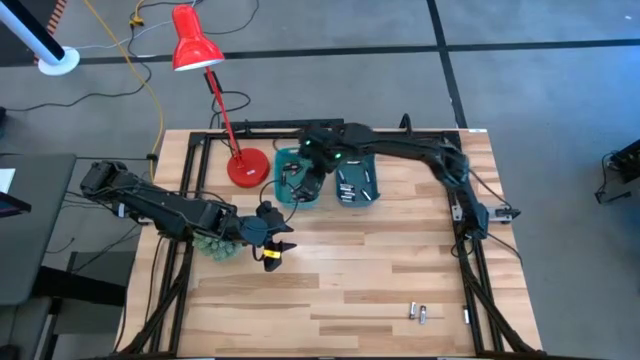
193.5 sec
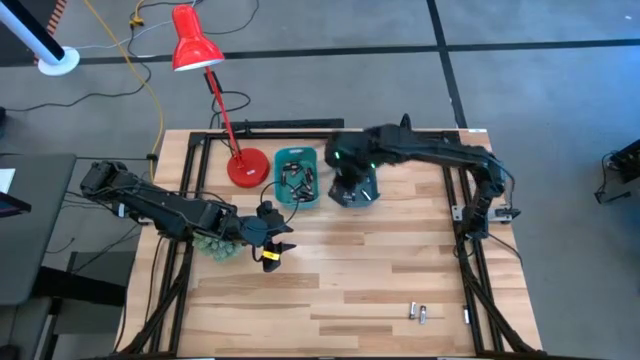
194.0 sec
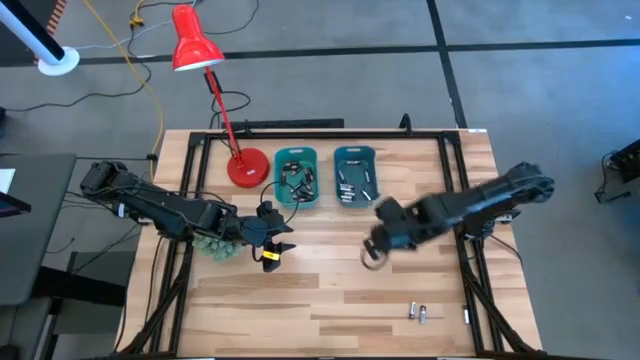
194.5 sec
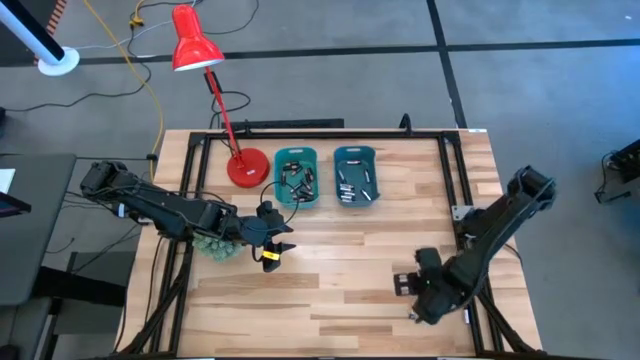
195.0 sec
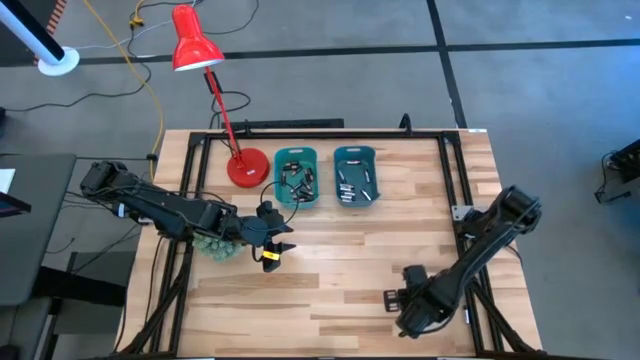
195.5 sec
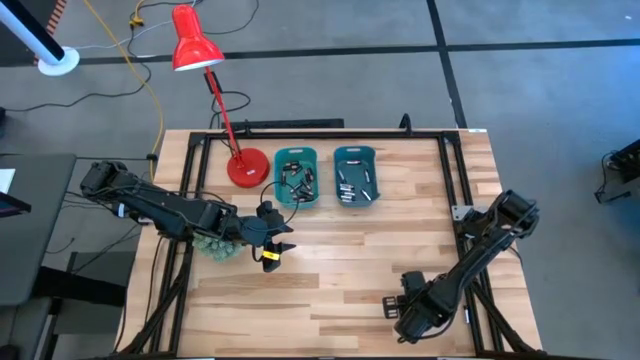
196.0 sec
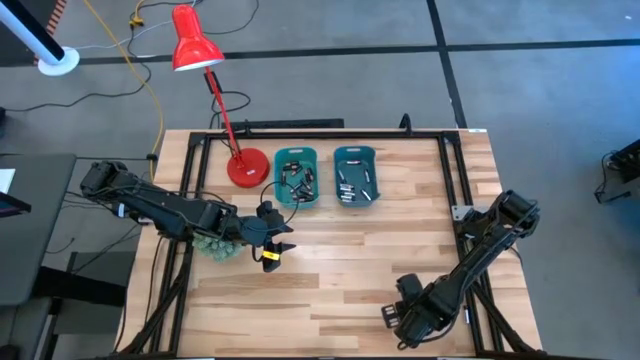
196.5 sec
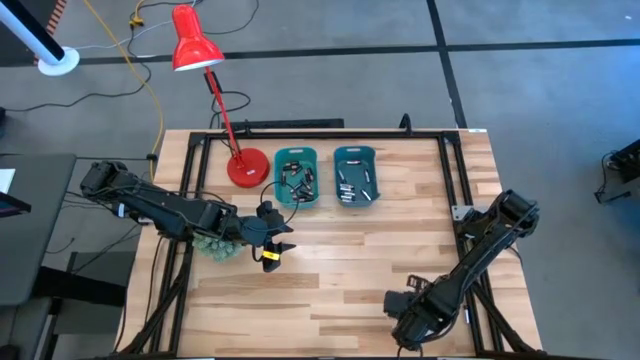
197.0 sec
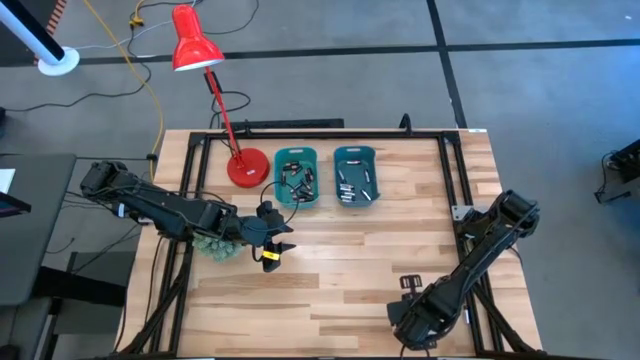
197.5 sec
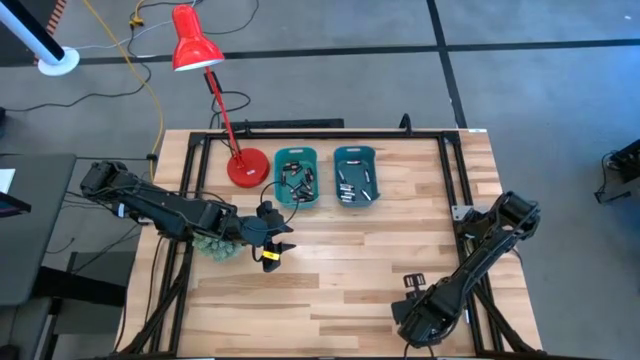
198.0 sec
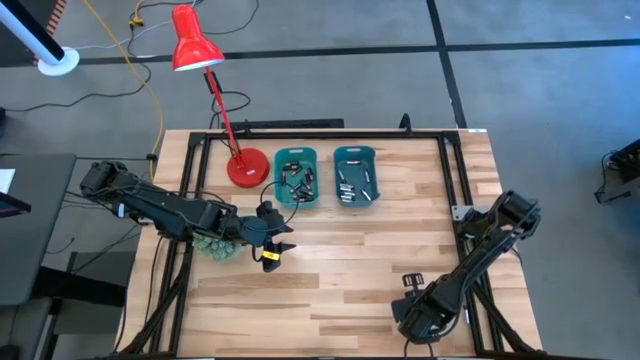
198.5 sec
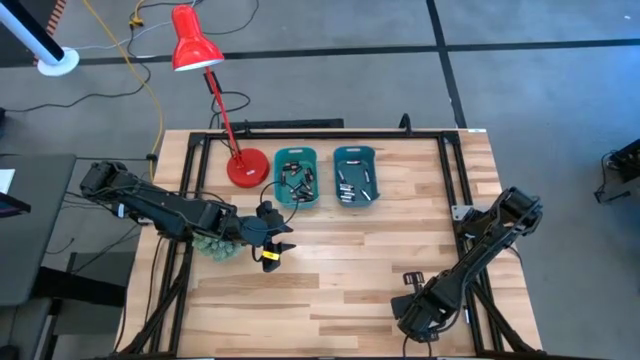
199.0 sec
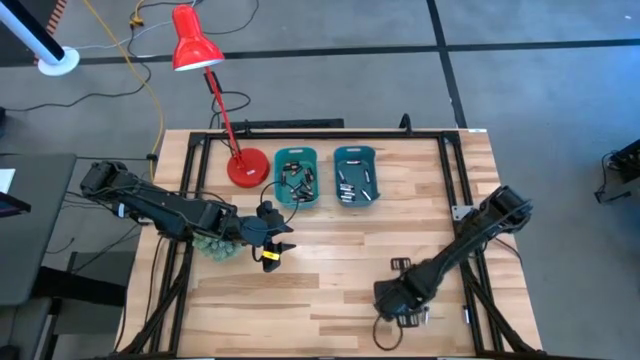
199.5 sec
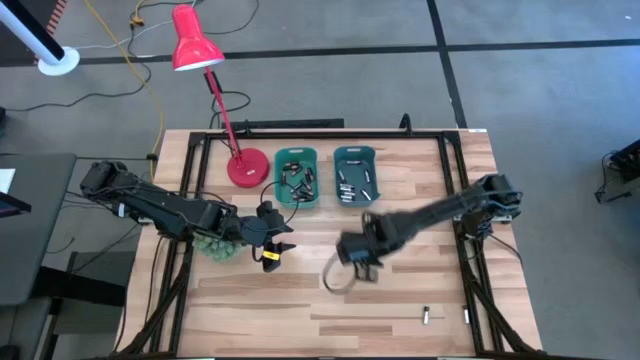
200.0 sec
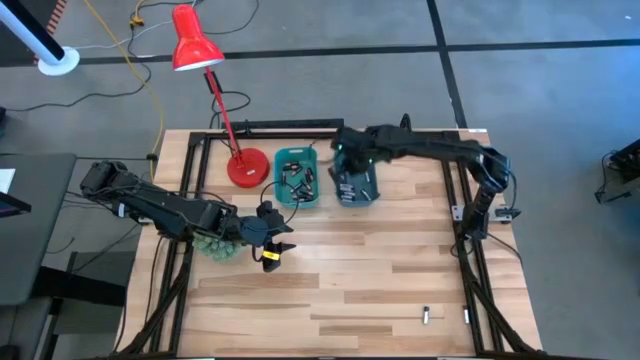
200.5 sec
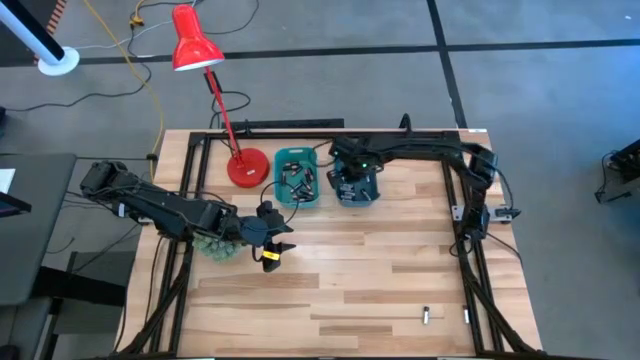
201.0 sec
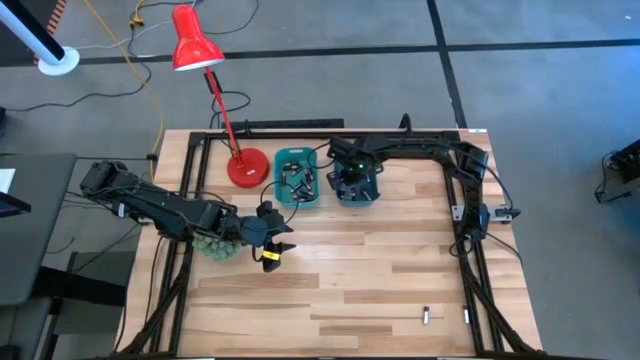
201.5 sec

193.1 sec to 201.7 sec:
Task: Sort batteries
Put the silver battery into the blue bin

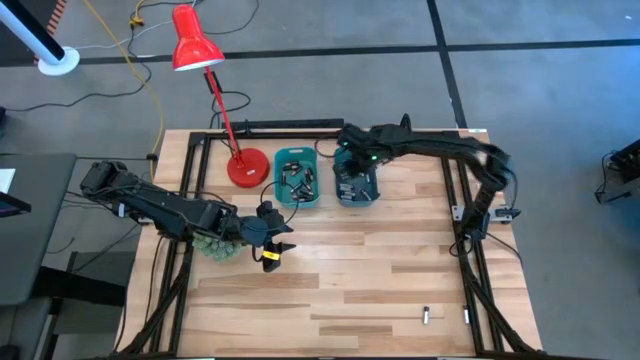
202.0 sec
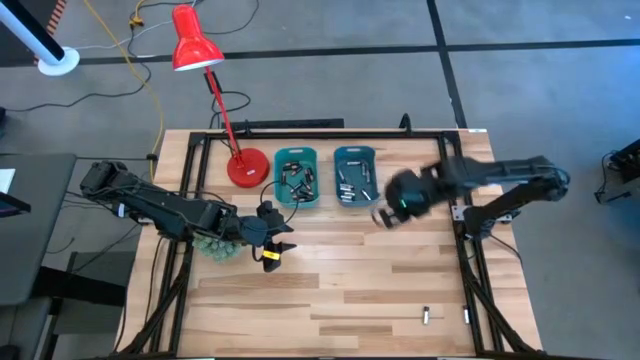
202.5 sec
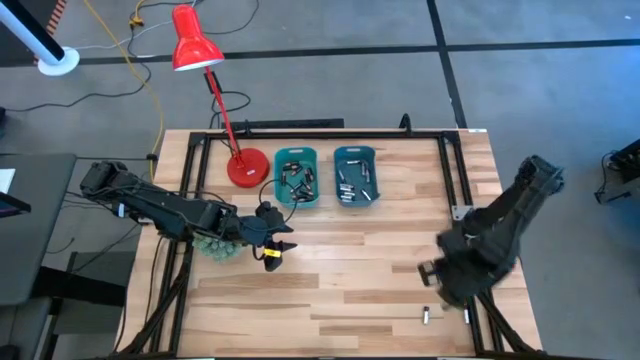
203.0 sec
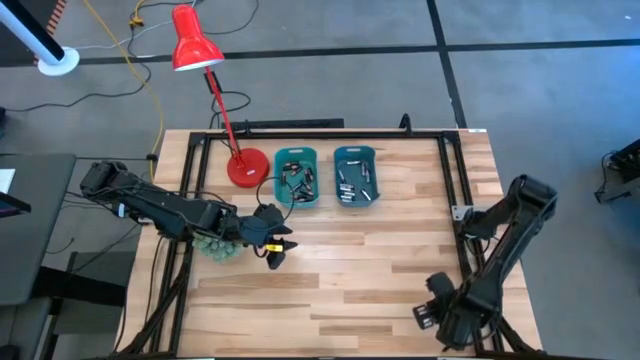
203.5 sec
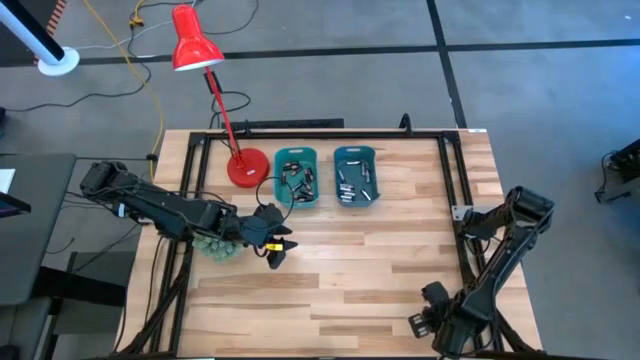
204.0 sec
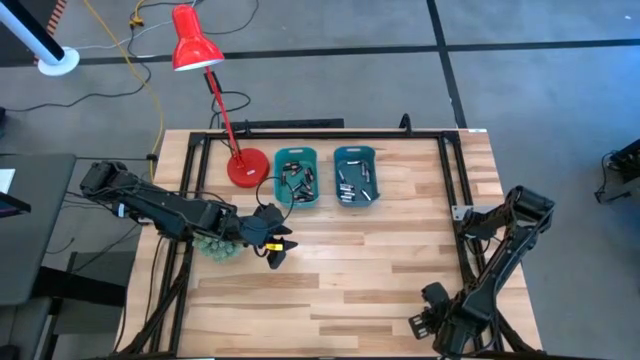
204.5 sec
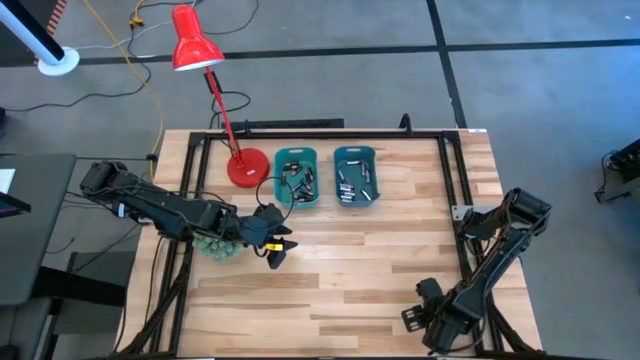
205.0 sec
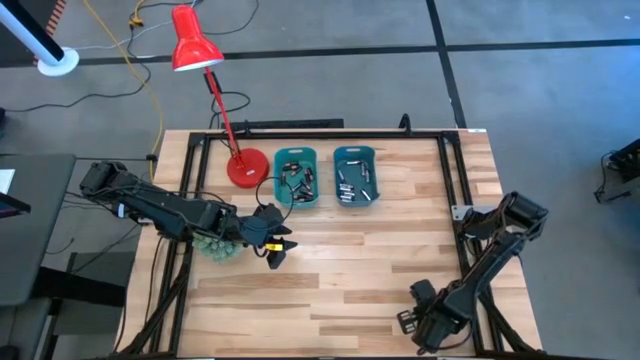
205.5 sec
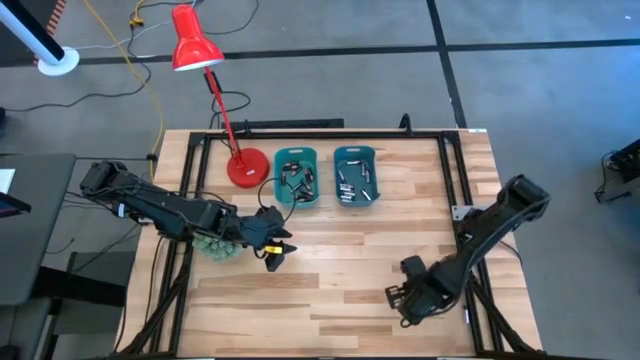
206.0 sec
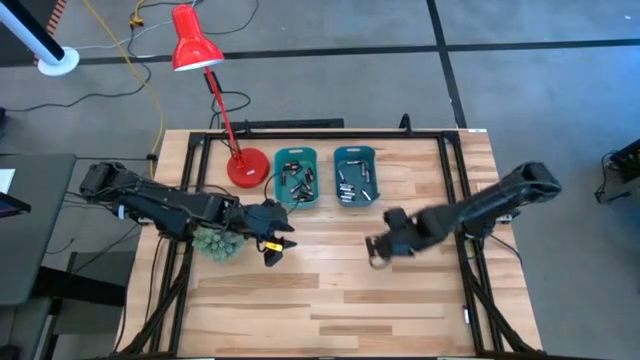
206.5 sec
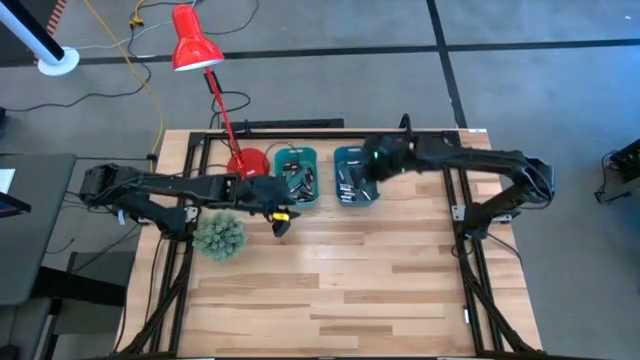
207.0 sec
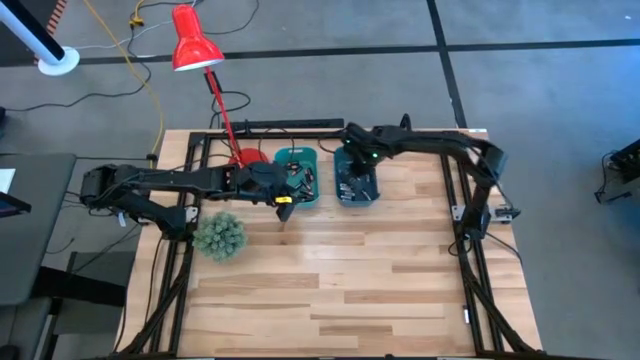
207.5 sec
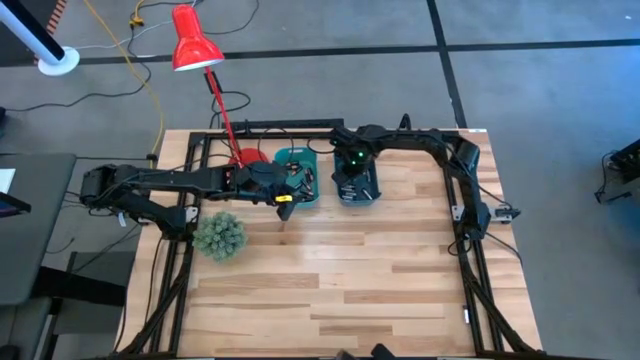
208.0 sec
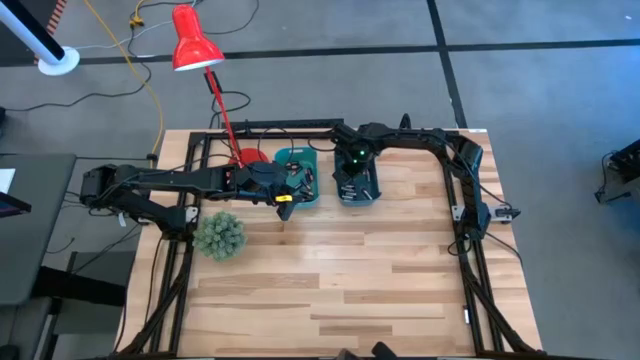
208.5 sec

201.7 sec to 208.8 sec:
Put the silver battery into the blue bin

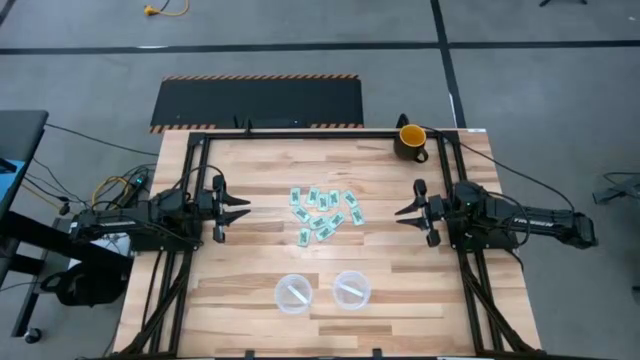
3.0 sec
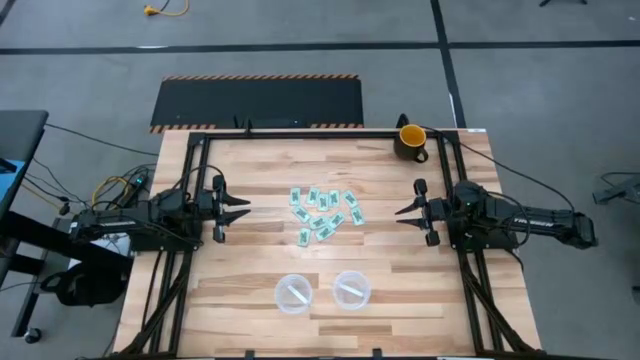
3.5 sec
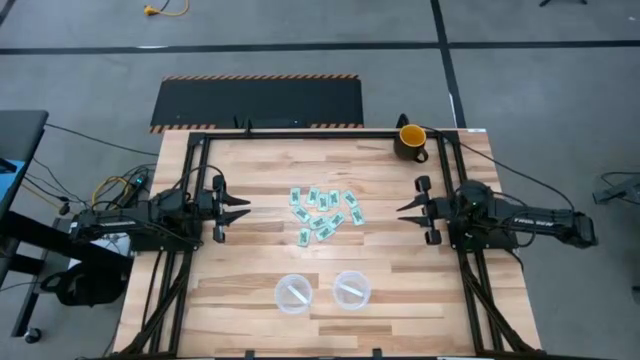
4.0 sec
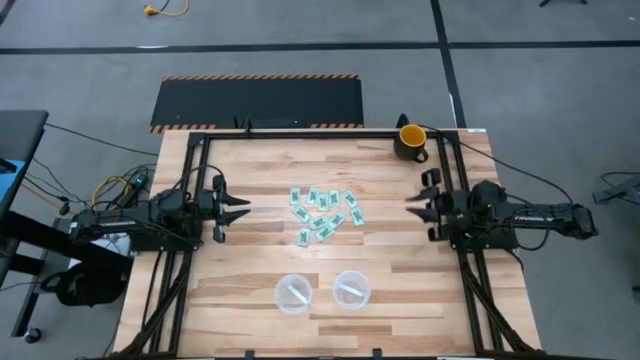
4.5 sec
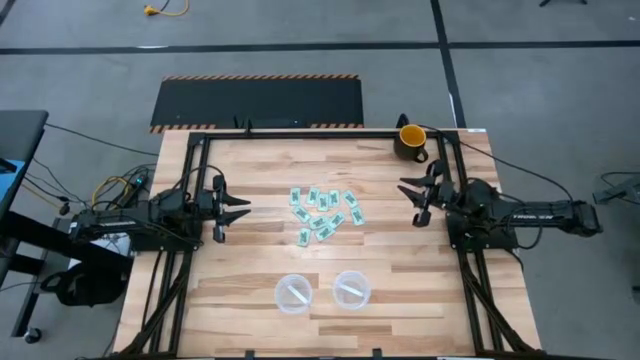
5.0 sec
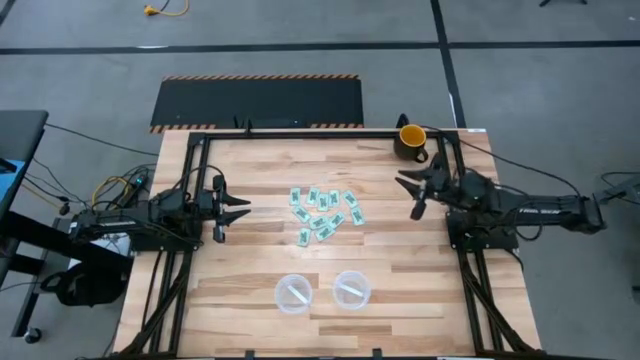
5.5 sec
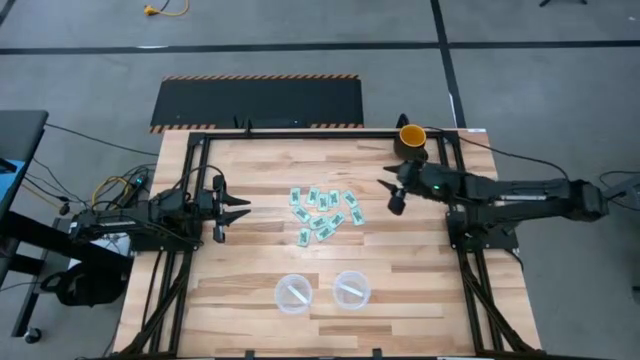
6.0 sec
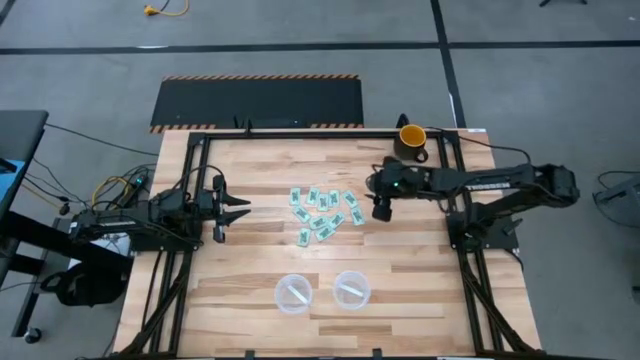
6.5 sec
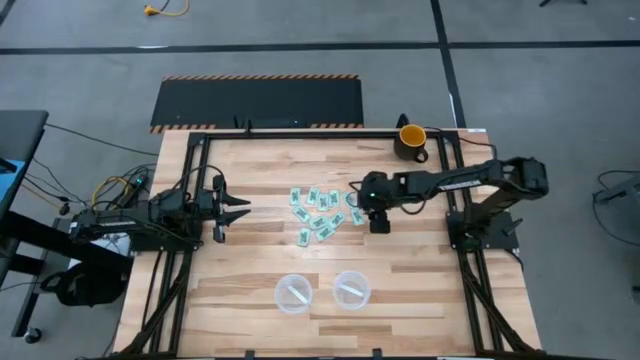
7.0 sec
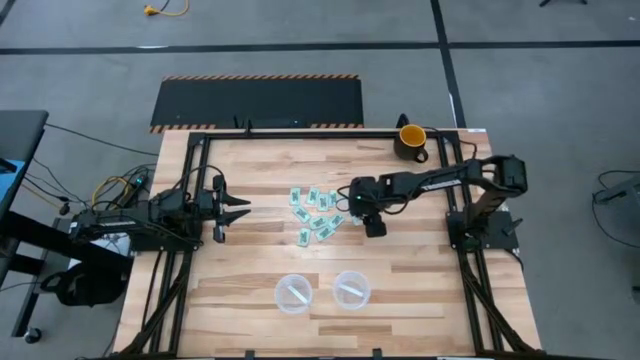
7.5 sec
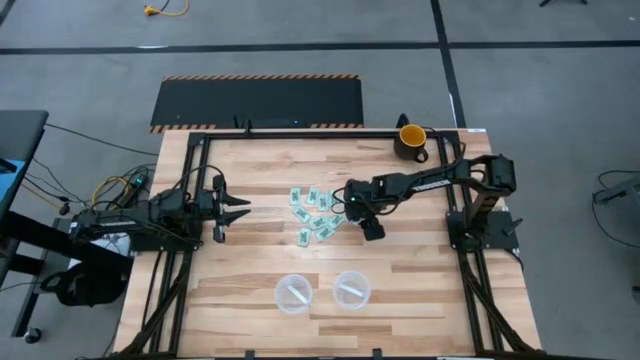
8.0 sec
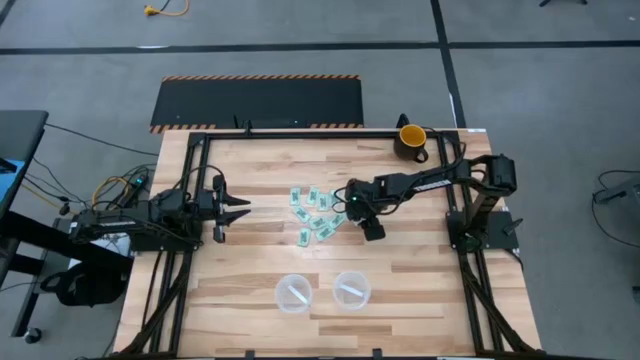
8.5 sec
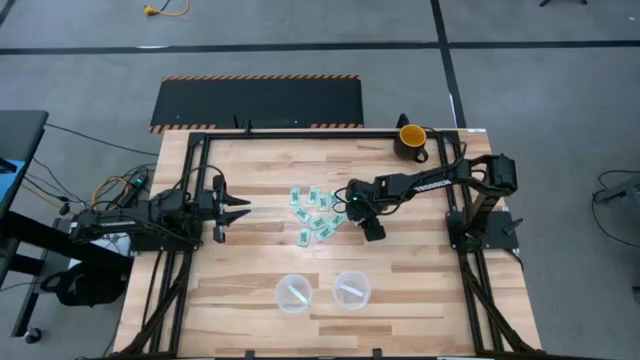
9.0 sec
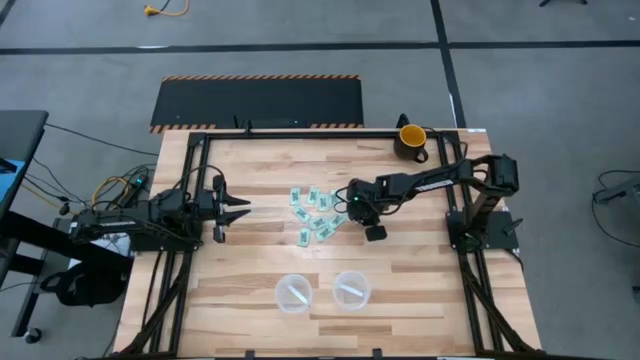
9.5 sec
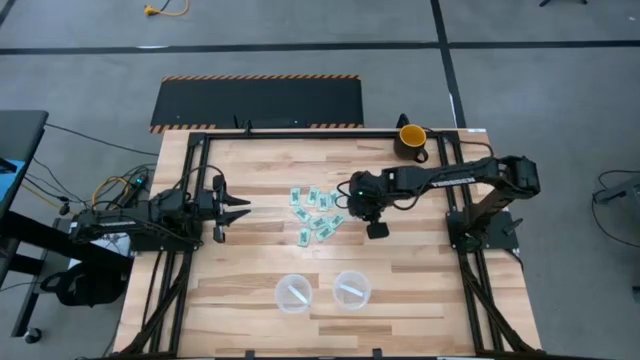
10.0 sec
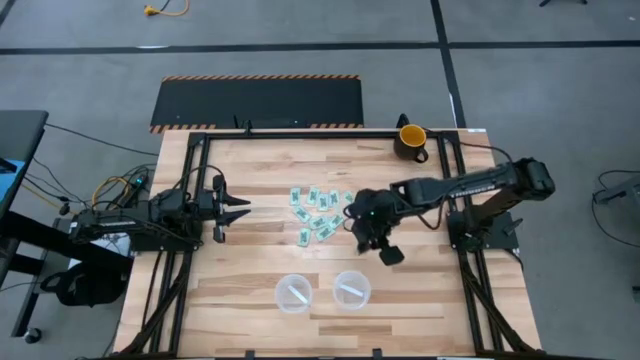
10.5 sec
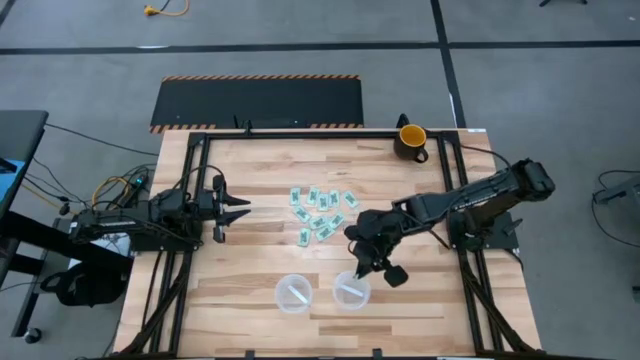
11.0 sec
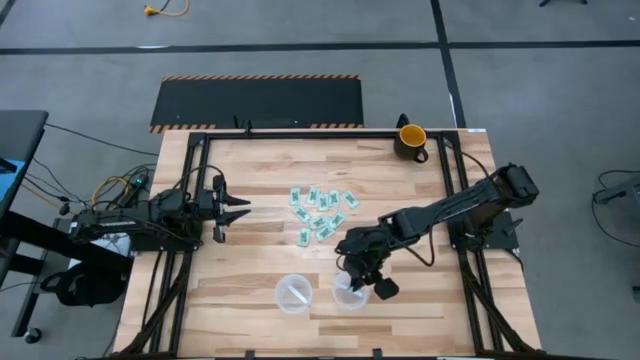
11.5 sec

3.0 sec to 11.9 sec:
Task: Pick and place Stevia / Truvia into bins
Put the white stevia pack into the right transparent basket
